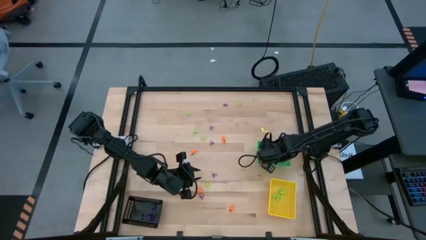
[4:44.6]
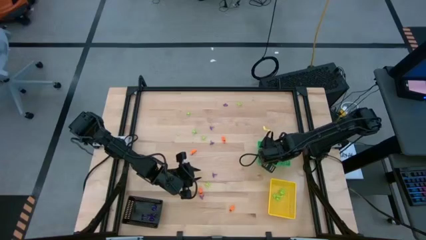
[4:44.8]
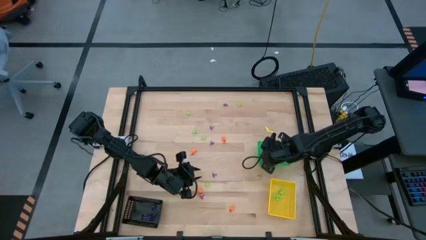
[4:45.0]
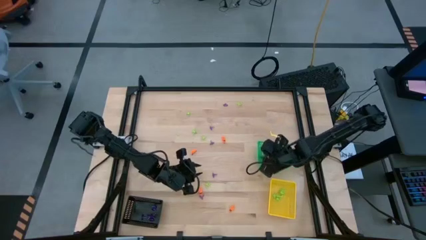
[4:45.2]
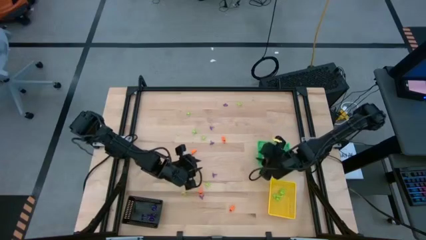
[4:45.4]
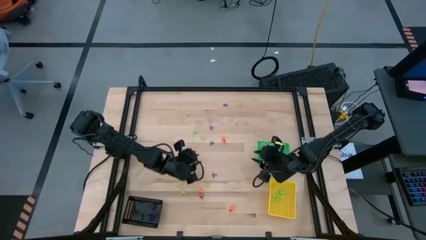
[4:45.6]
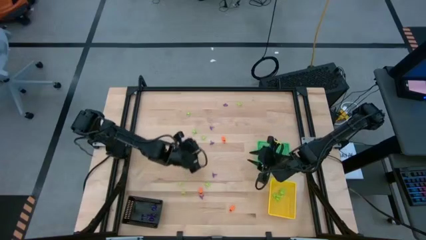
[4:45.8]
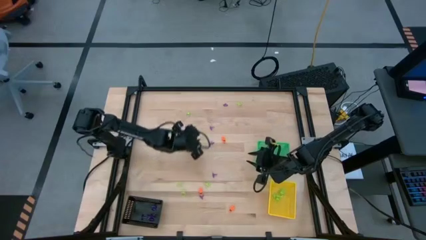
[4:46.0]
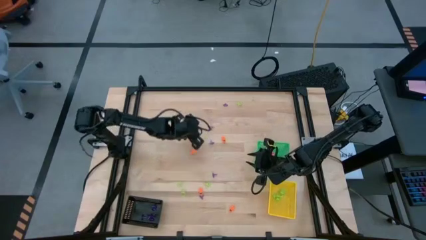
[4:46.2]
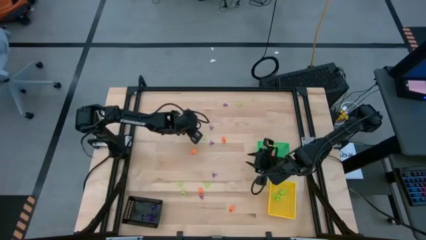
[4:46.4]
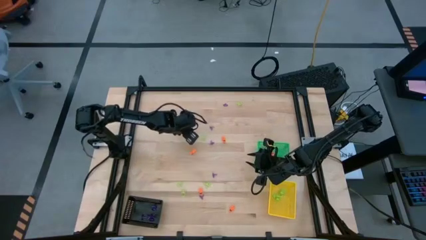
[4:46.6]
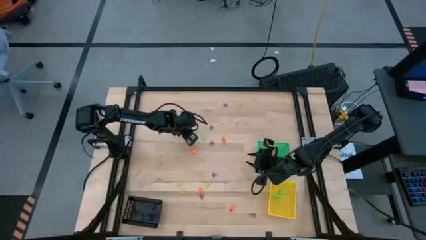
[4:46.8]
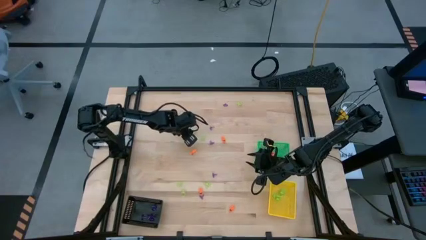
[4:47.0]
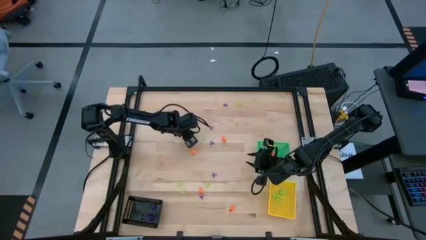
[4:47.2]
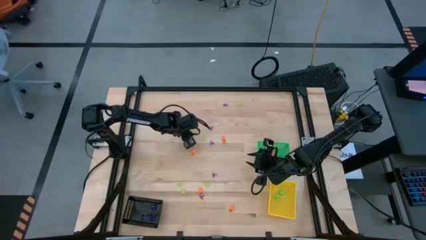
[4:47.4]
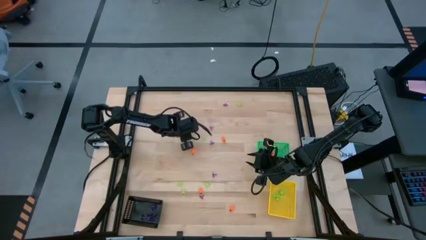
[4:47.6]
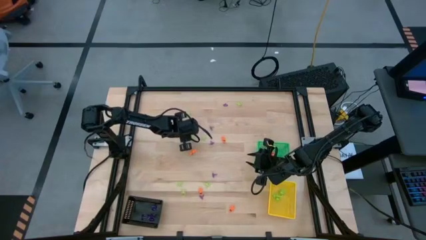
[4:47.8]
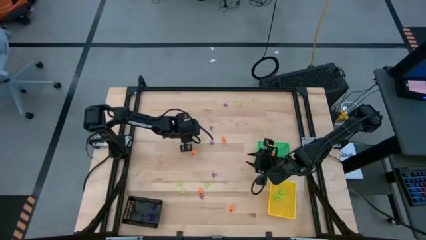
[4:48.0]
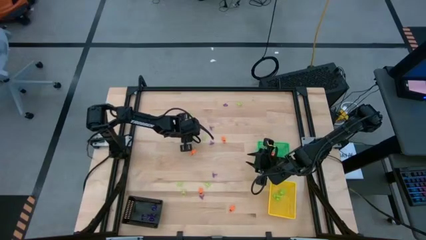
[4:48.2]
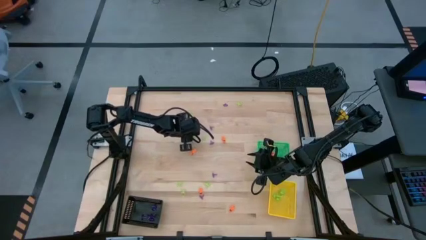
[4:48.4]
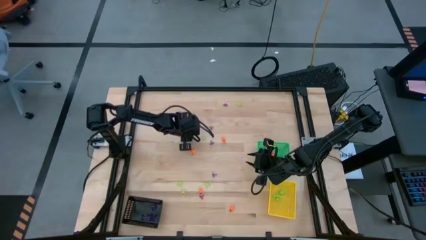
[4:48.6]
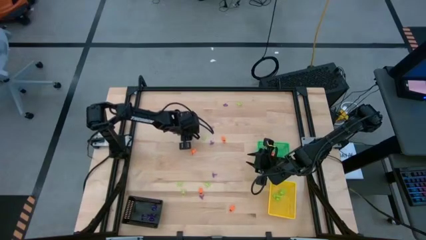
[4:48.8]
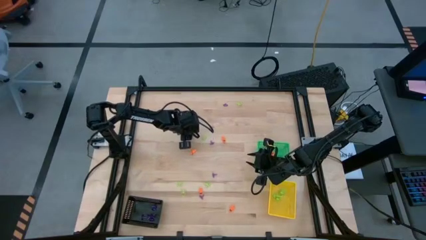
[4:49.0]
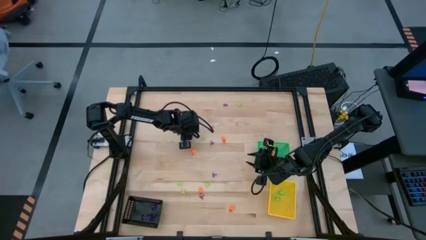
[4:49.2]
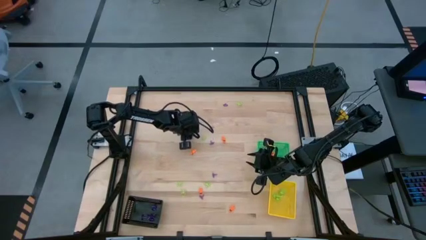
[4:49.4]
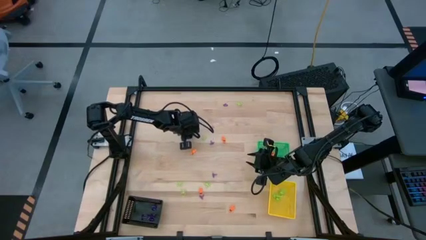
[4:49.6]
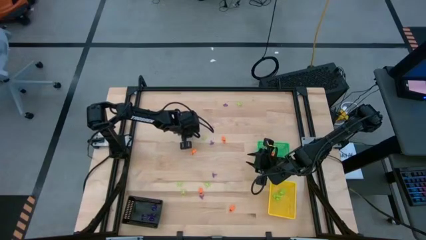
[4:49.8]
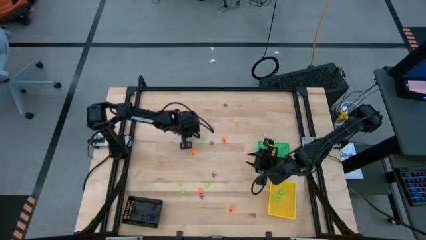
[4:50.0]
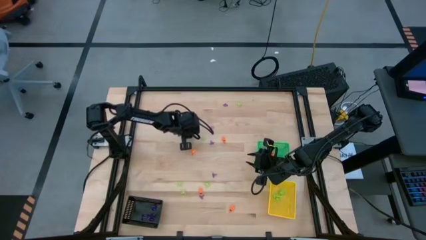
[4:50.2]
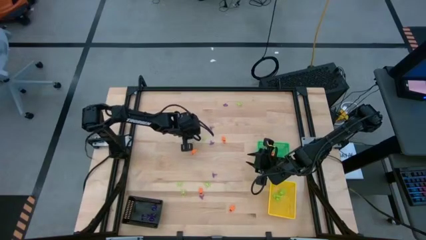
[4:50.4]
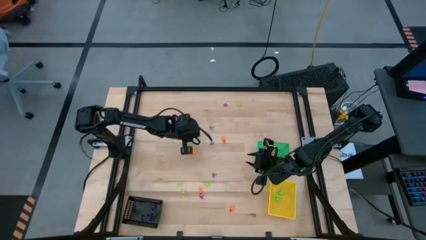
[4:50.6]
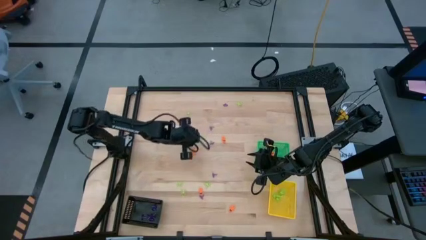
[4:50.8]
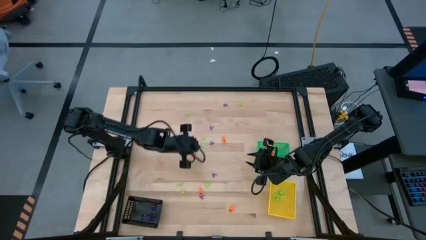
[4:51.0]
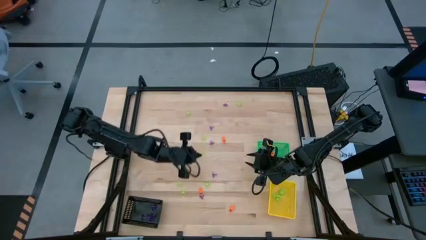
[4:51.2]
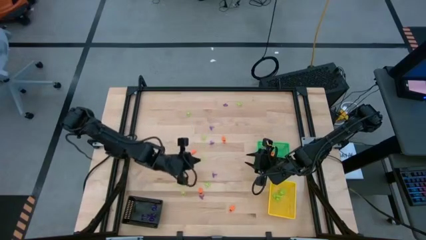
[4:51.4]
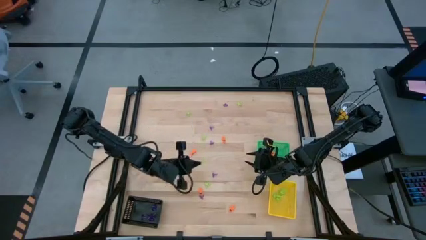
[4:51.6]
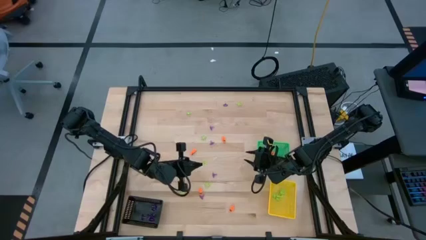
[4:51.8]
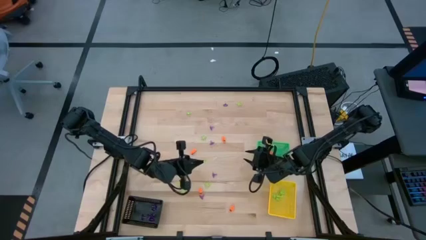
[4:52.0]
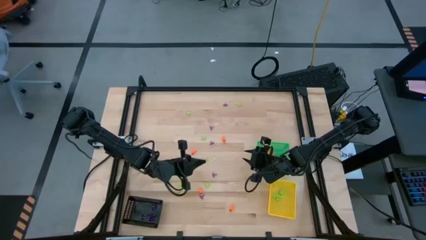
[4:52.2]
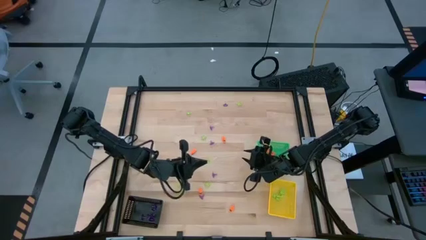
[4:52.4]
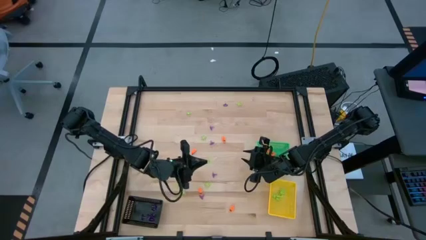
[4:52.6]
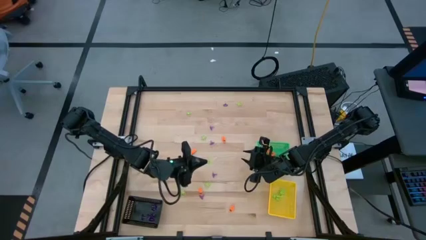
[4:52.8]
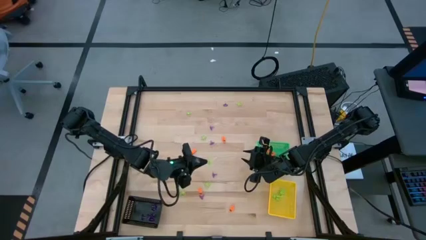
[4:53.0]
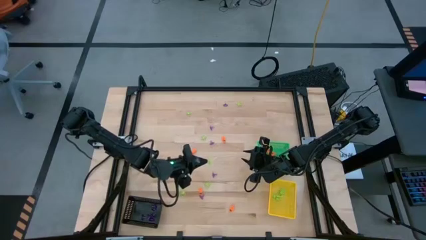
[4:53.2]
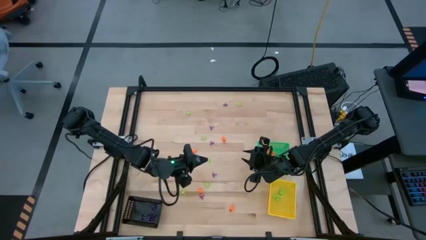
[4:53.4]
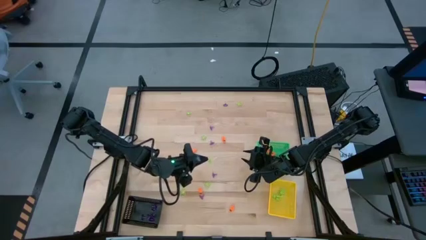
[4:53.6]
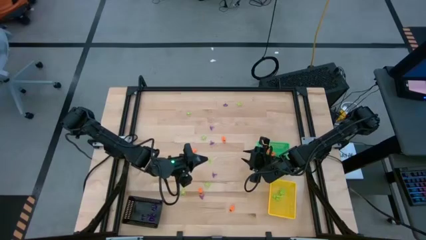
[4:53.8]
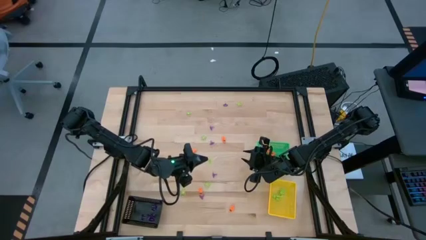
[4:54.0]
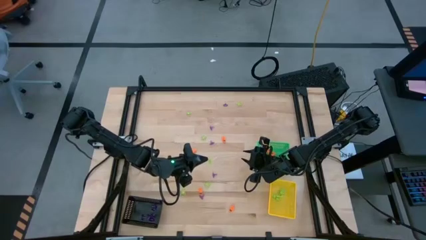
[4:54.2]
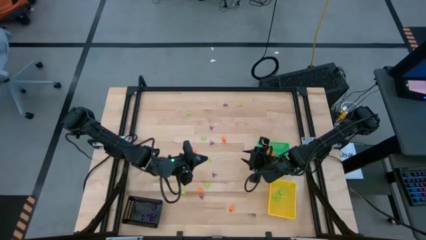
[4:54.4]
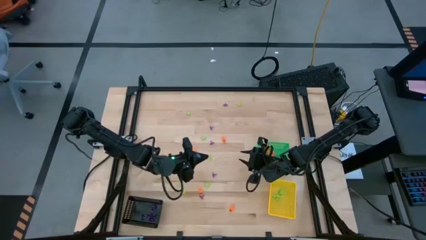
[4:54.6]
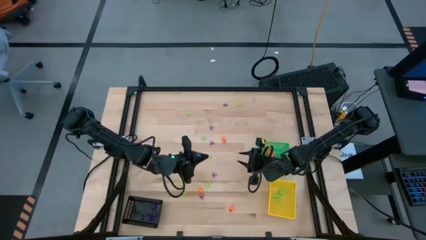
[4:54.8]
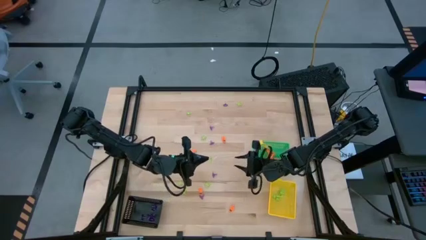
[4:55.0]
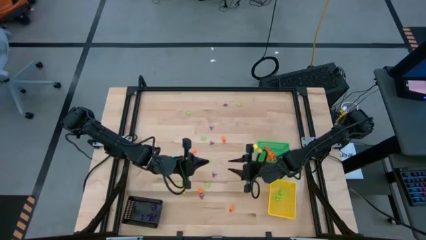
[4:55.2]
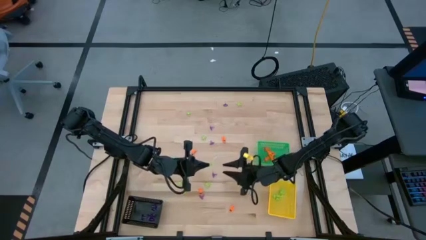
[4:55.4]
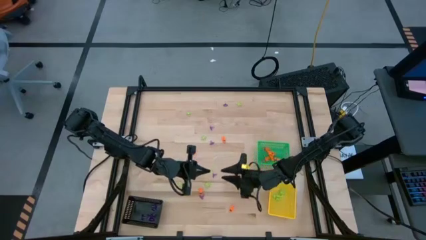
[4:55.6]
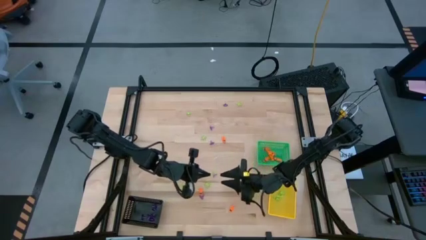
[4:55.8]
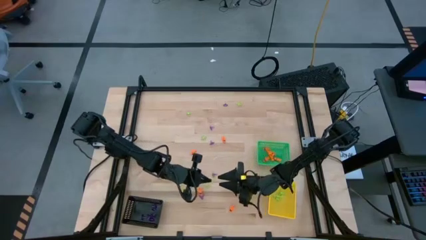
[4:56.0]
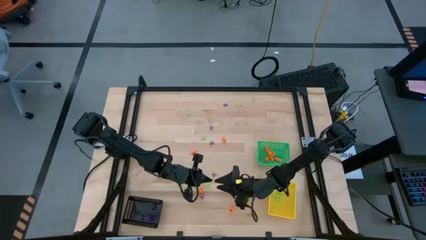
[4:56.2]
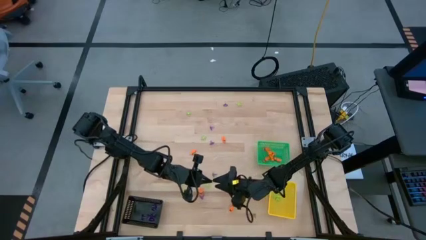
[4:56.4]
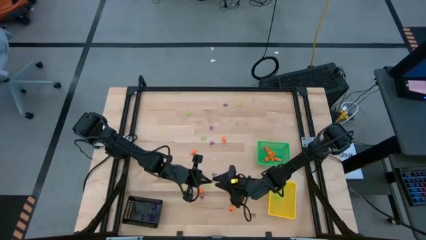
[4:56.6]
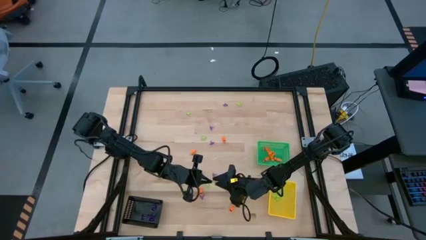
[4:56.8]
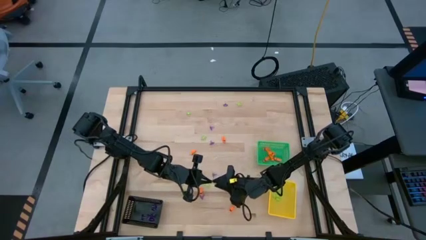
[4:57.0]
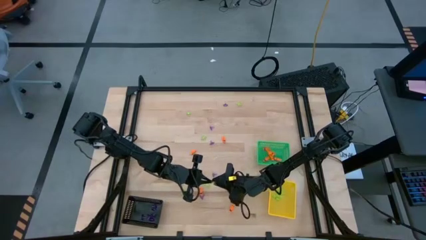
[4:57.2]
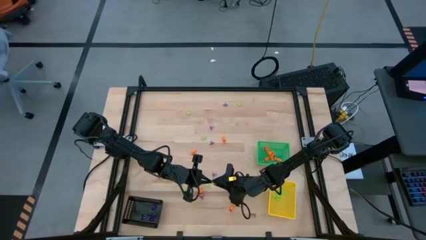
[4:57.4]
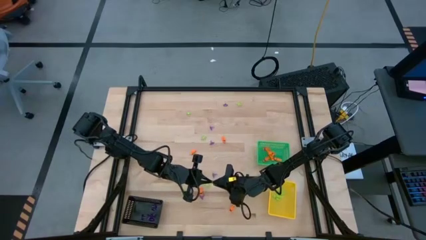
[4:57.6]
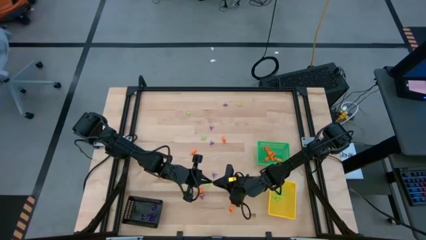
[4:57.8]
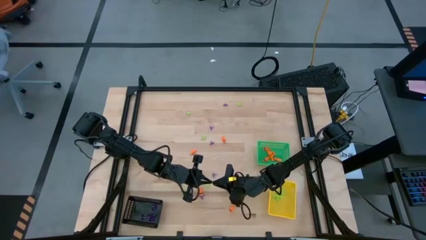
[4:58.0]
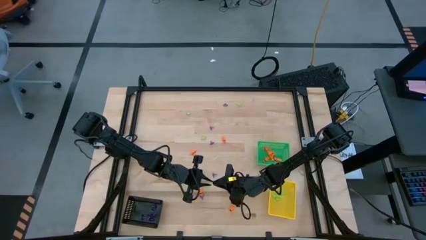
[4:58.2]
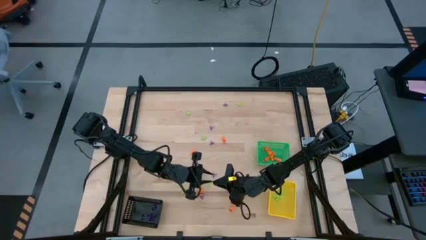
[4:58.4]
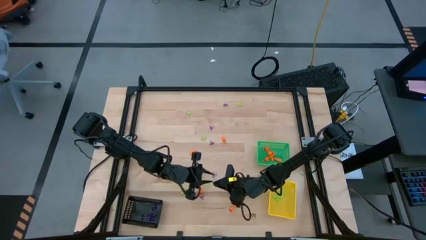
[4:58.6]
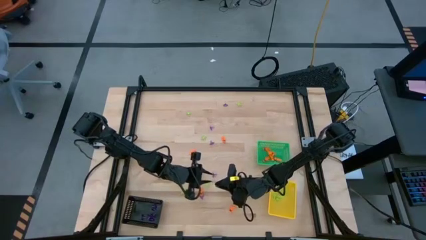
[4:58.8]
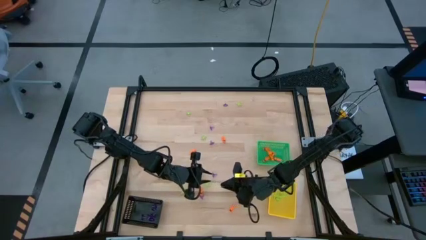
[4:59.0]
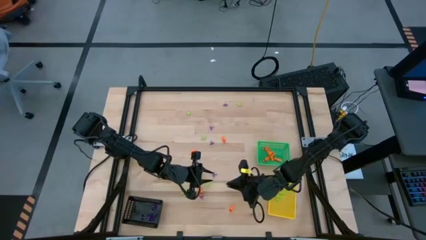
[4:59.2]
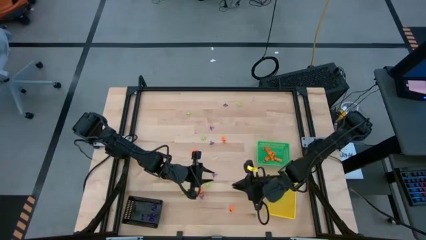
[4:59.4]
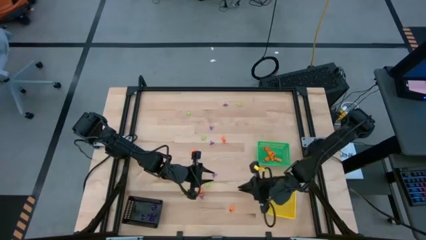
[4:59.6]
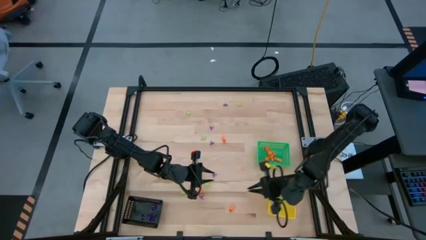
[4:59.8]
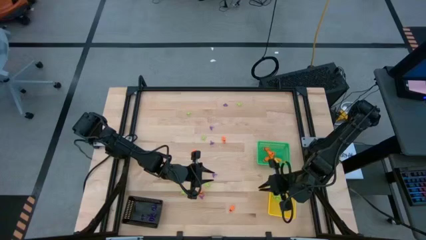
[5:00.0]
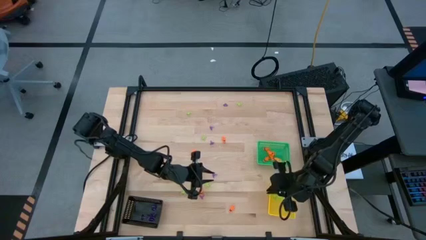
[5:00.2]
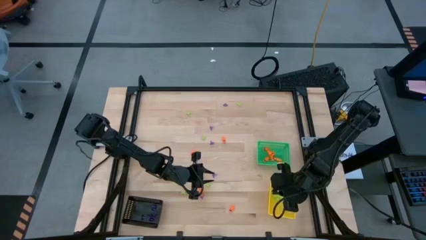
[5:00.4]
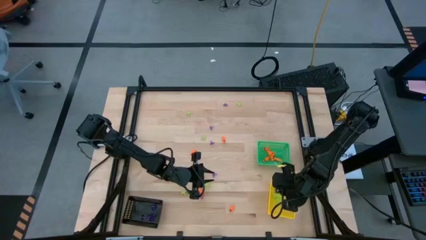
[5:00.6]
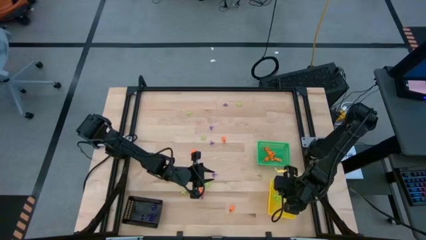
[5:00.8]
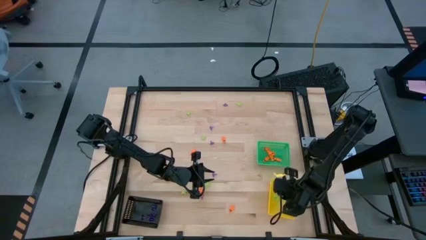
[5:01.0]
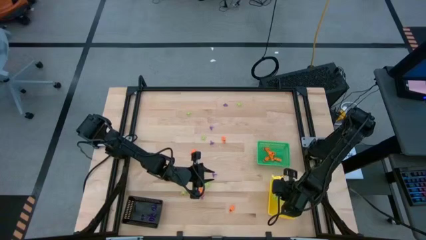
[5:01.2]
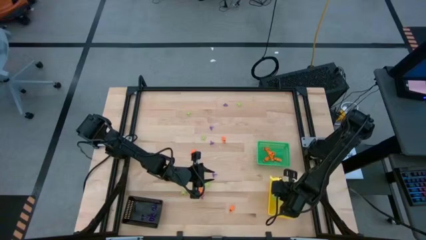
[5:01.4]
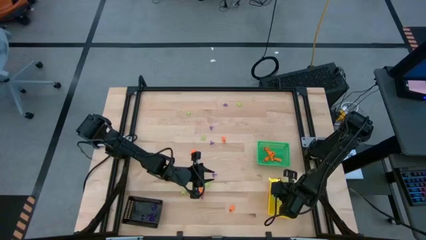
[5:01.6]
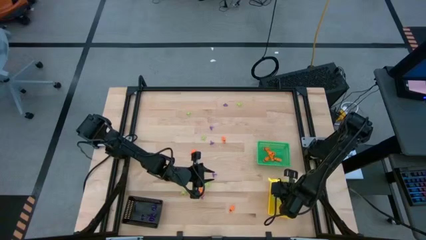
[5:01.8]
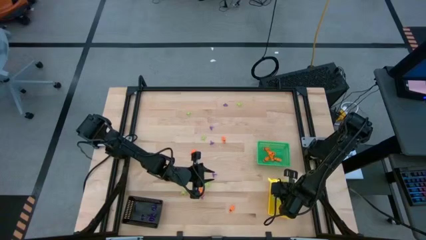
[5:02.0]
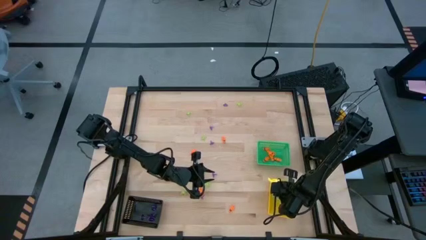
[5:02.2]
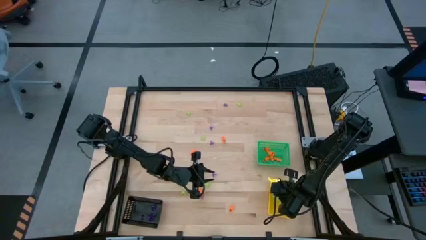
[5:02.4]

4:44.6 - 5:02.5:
Task: Sort Halloween decoration
Put the green spider toy into the yellow bin
